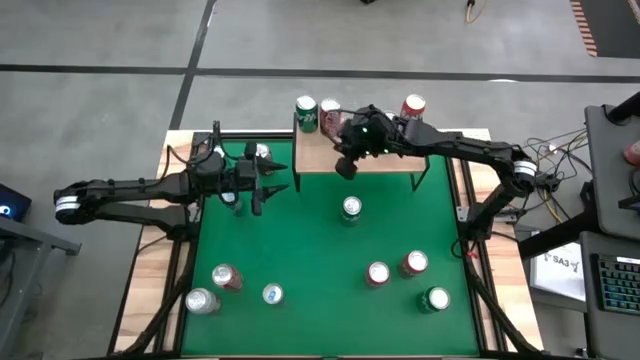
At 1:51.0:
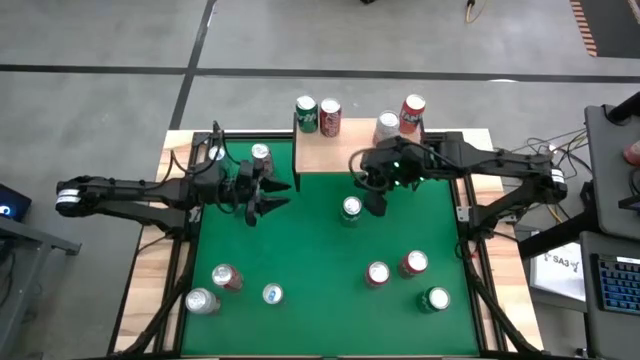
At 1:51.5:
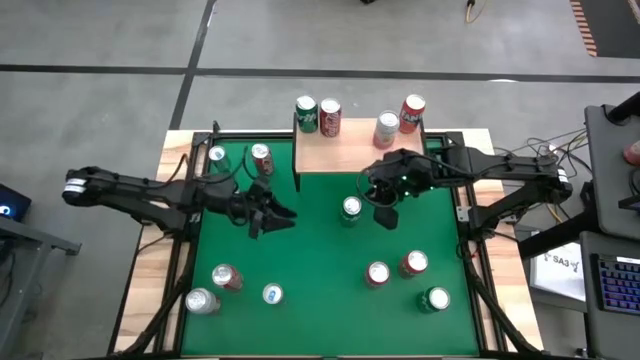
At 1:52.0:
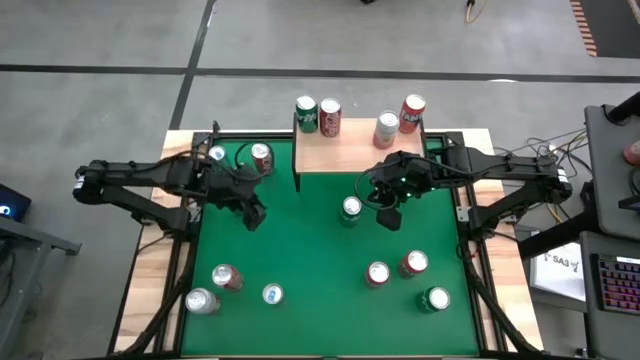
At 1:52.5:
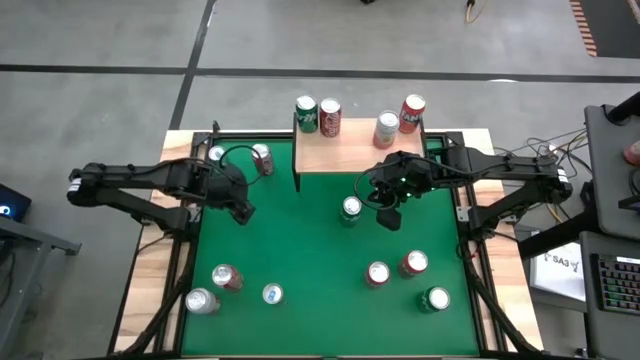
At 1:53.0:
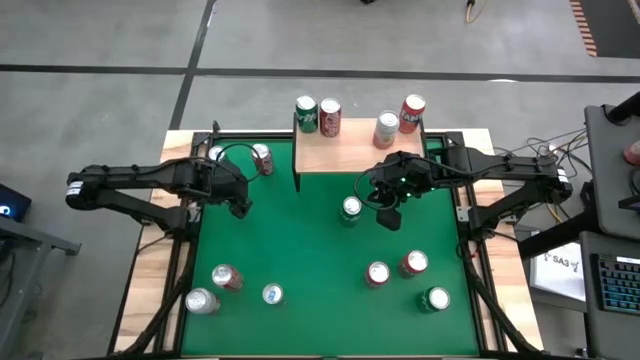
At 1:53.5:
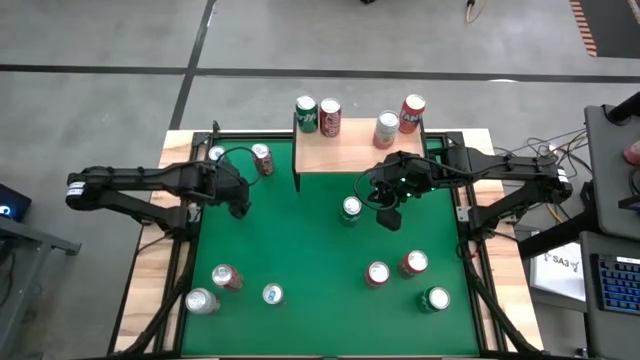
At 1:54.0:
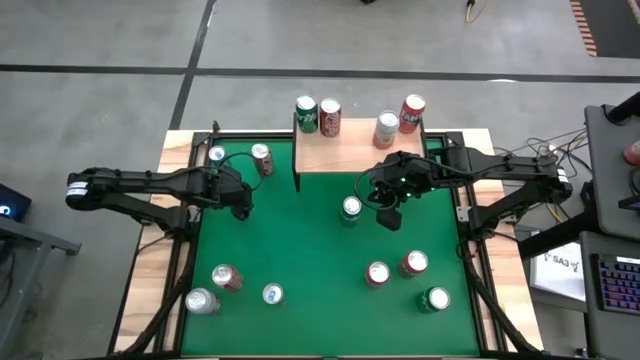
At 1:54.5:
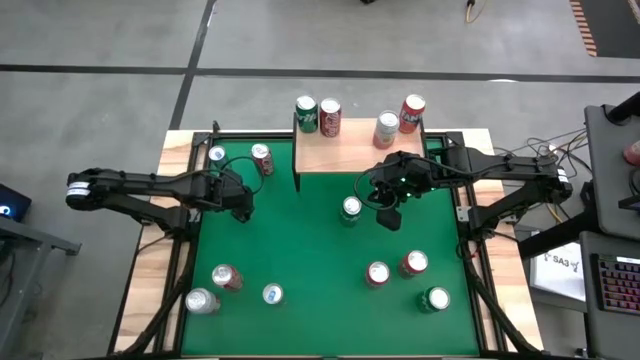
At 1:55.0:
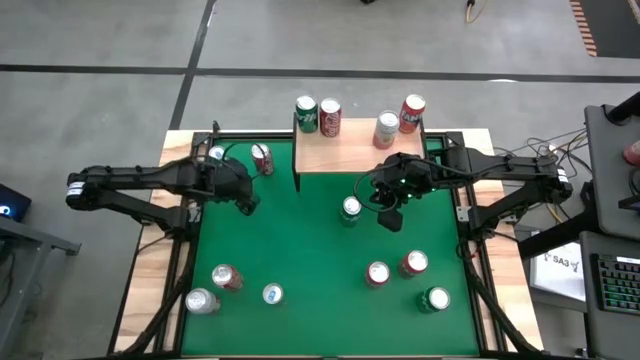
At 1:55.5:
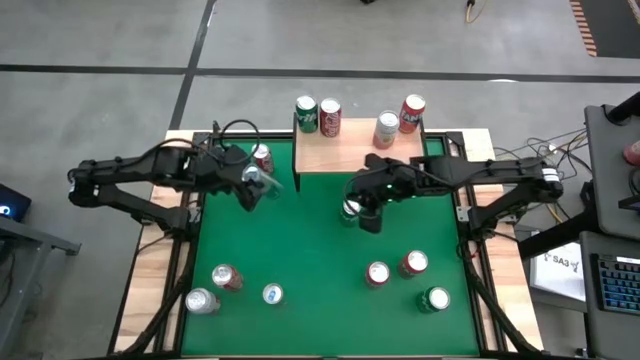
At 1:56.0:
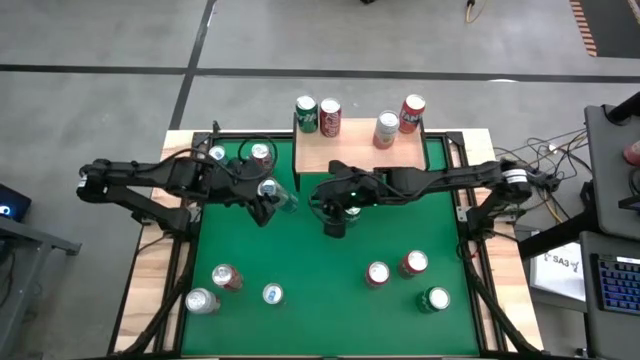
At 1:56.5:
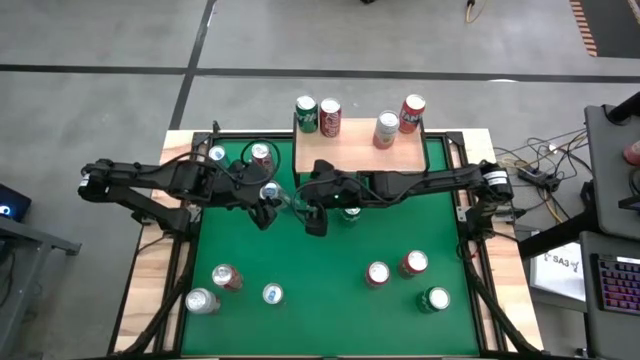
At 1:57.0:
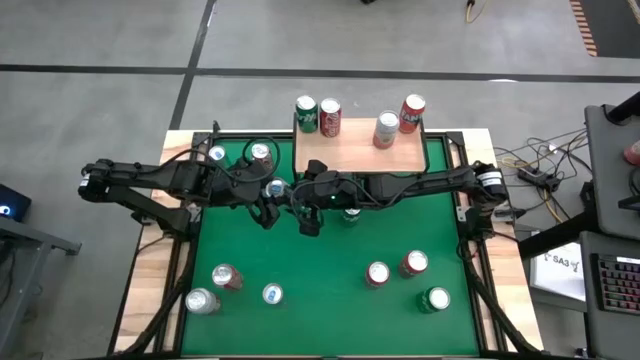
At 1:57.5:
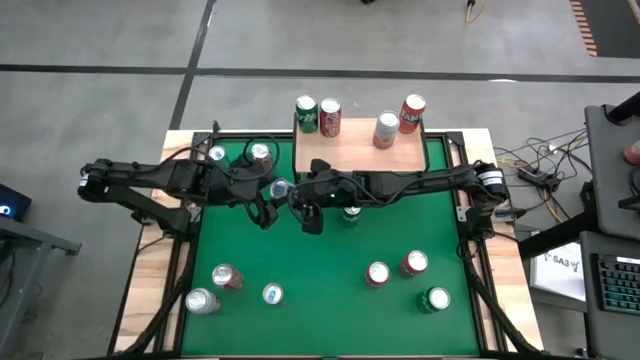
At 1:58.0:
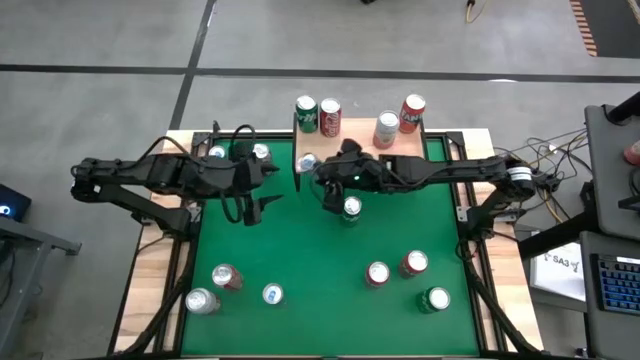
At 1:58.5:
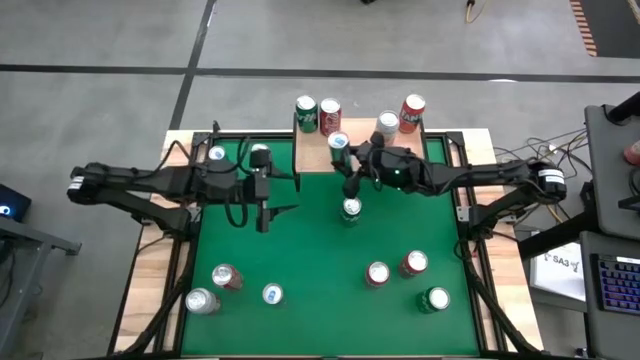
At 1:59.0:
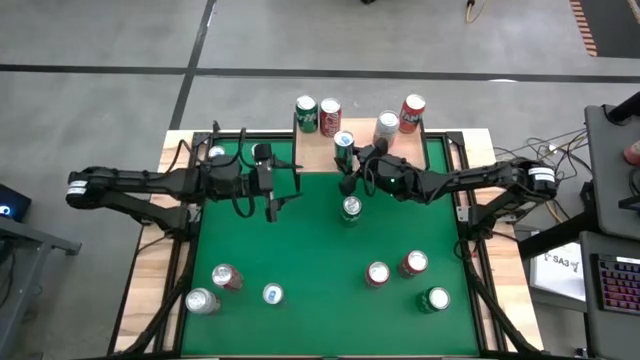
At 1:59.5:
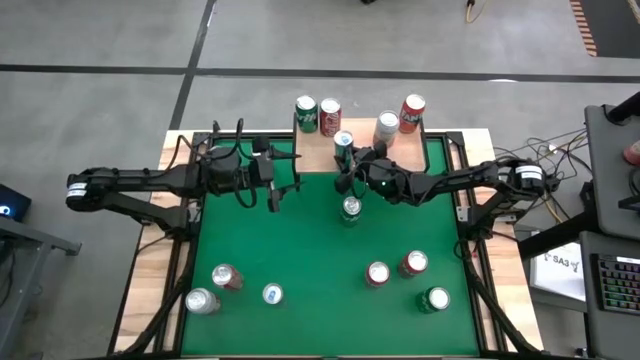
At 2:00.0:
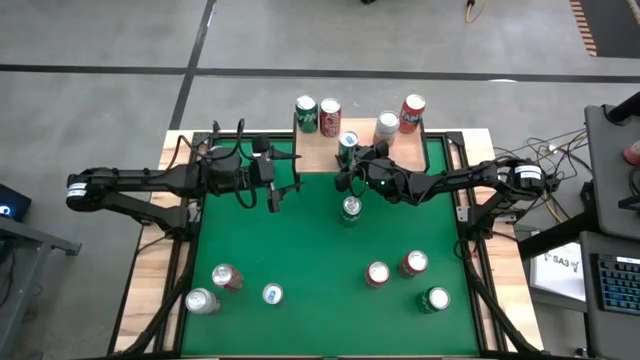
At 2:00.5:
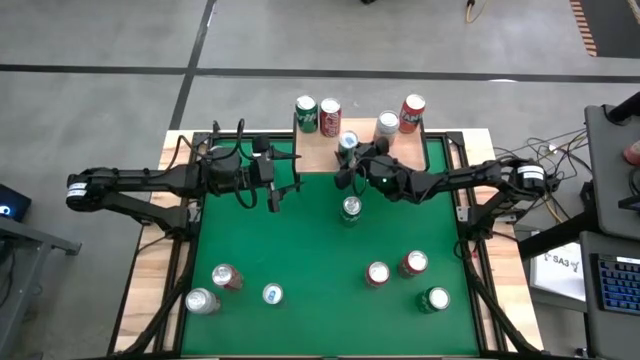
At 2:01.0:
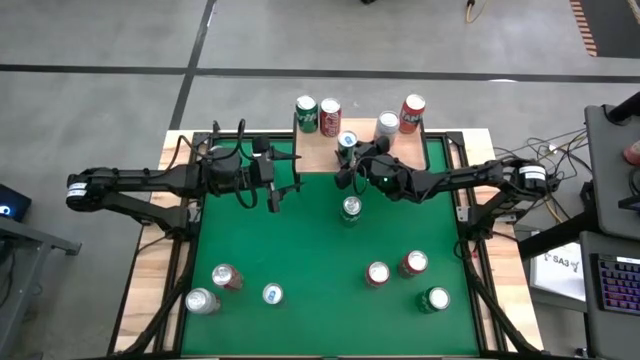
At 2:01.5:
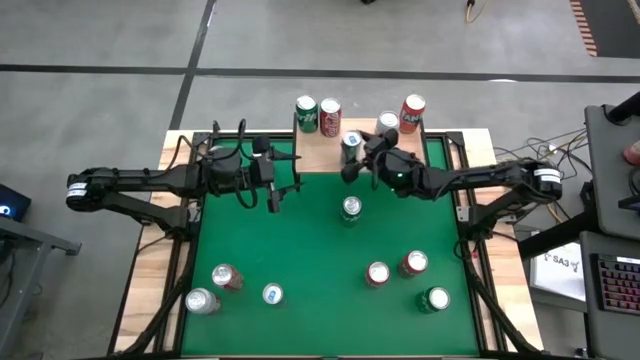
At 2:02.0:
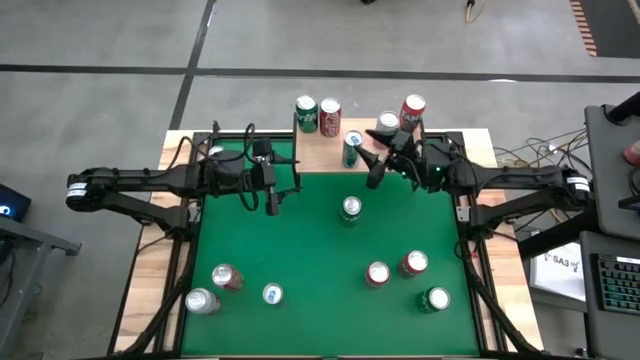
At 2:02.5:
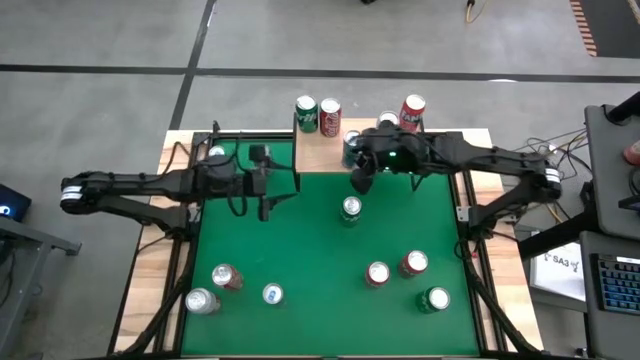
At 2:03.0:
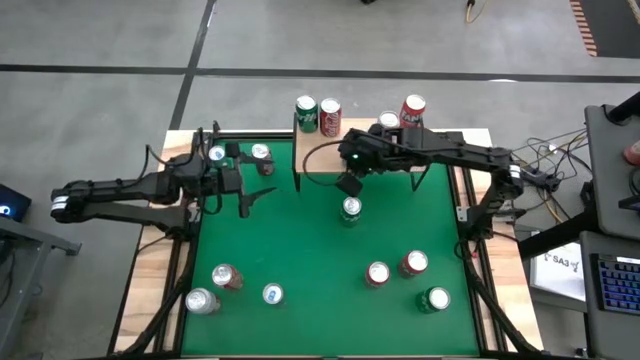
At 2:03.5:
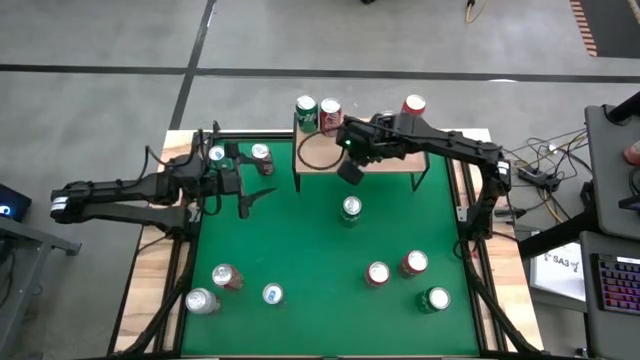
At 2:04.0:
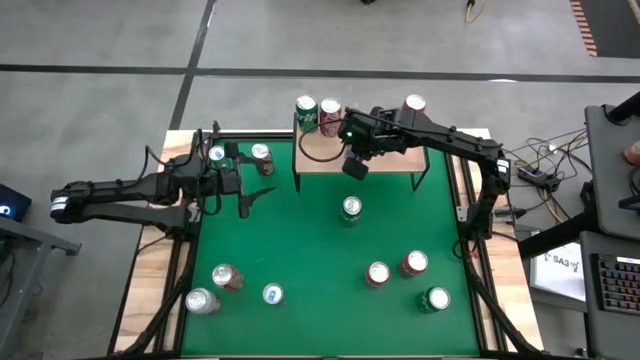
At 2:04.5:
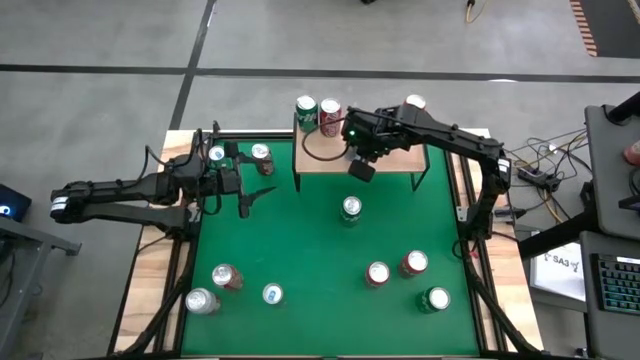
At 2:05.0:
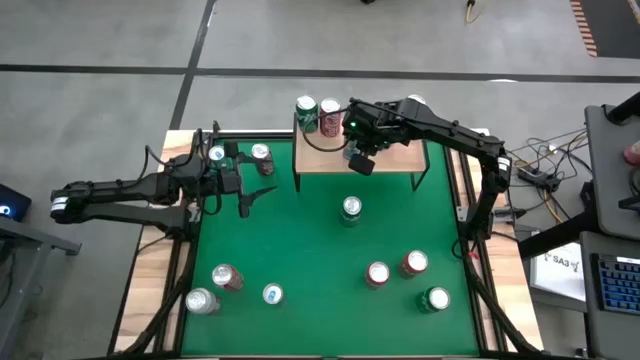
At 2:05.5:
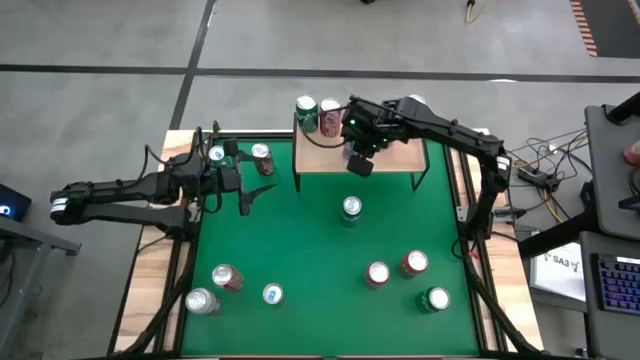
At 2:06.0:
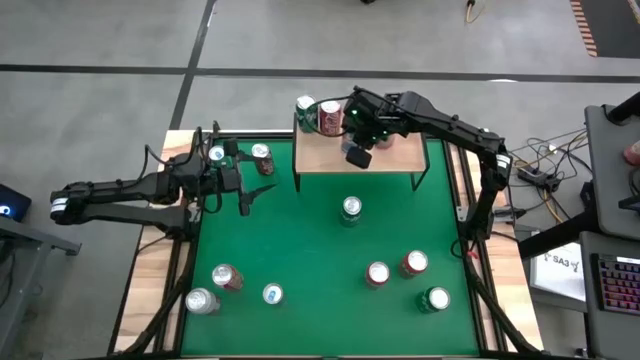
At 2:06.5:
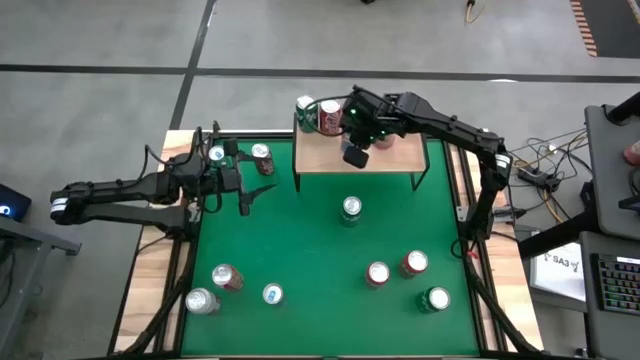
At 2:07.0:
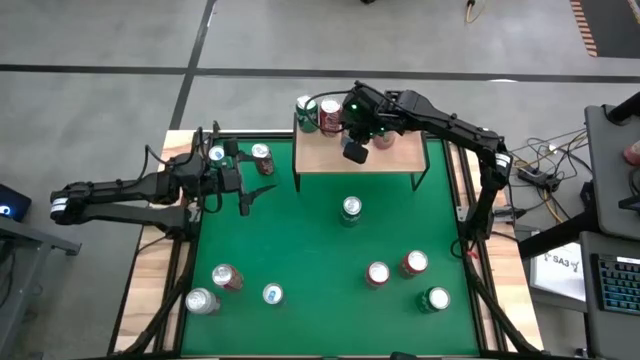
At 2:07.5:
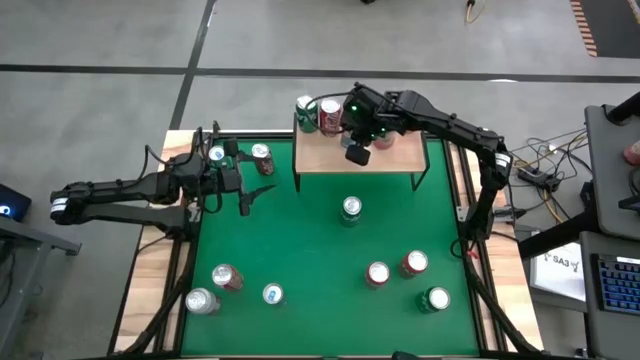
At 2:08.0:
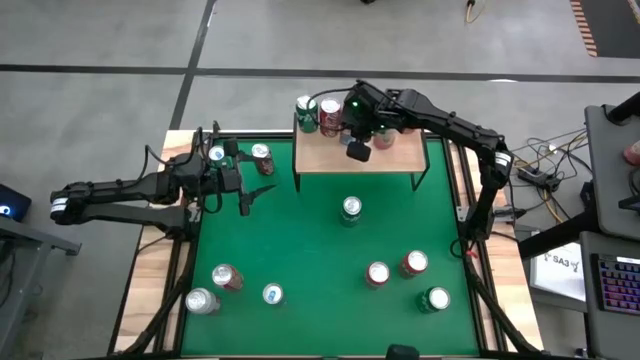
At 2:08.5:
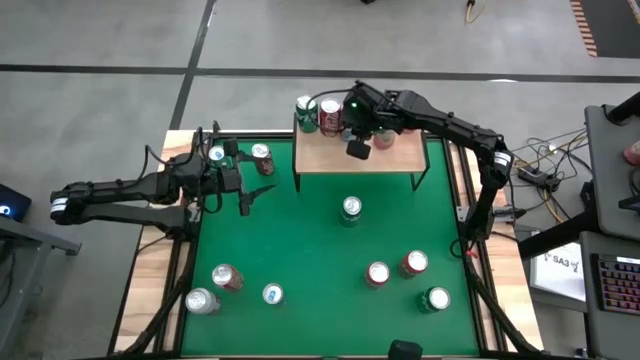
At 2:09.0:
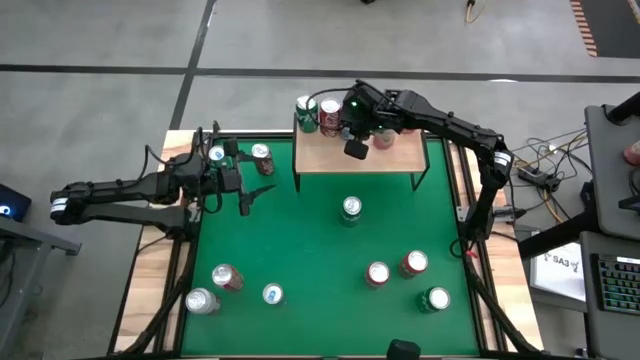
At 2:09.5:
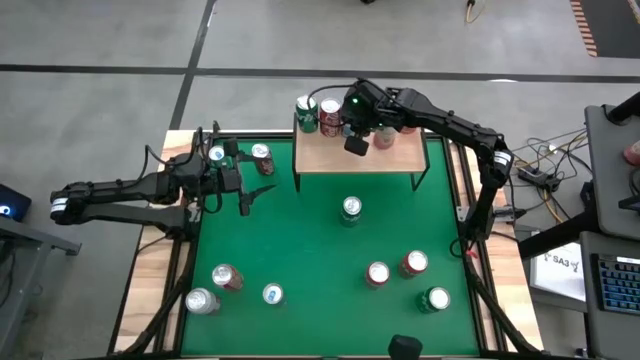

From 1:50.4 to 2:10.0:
Task: Place canned beverage on shelf
Put the middle blue soda can on the shelf

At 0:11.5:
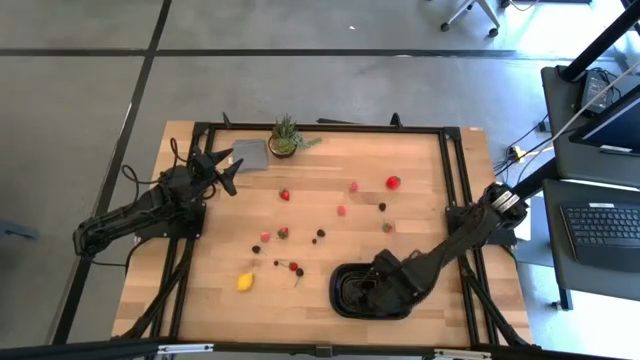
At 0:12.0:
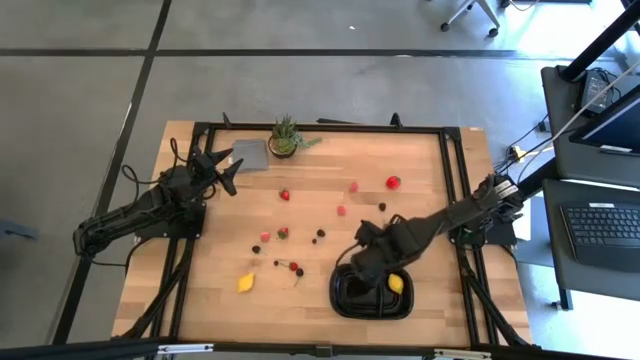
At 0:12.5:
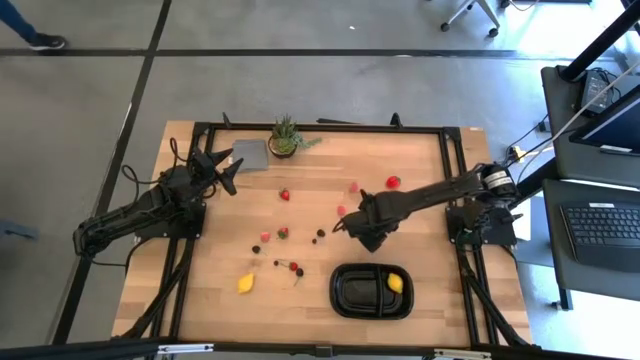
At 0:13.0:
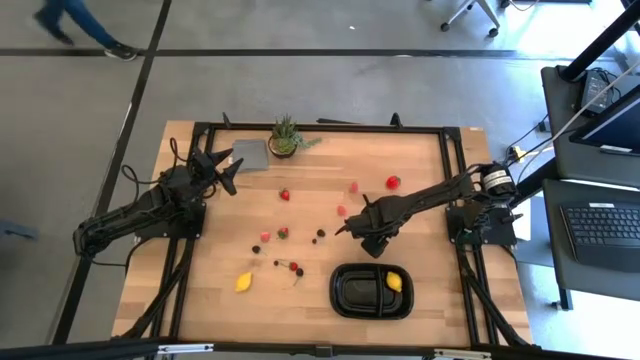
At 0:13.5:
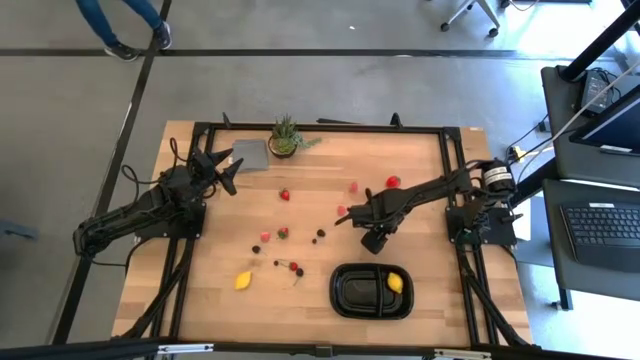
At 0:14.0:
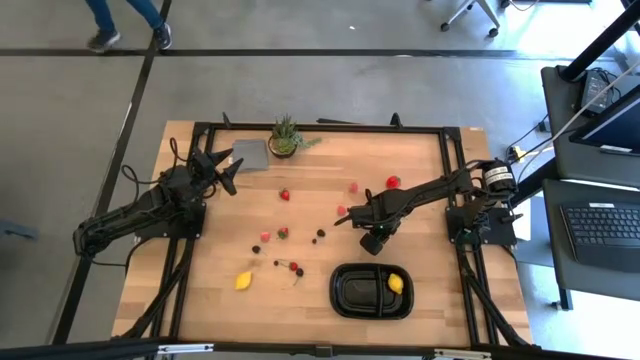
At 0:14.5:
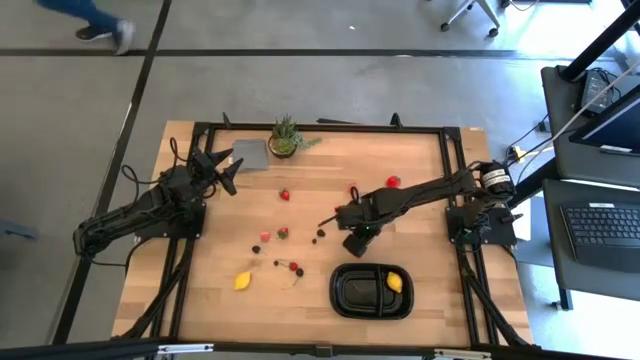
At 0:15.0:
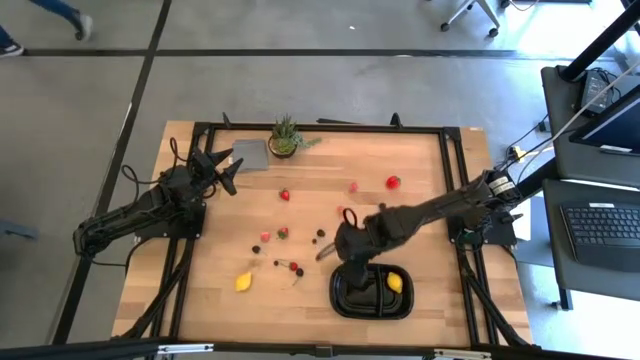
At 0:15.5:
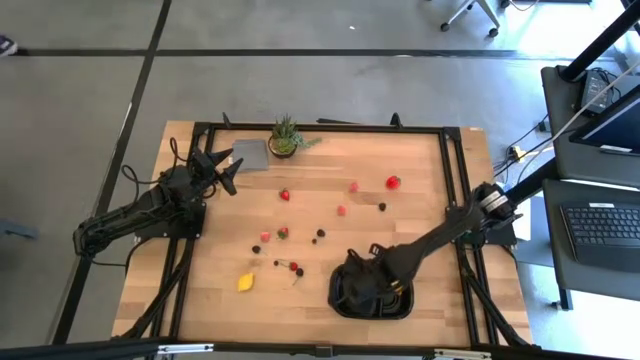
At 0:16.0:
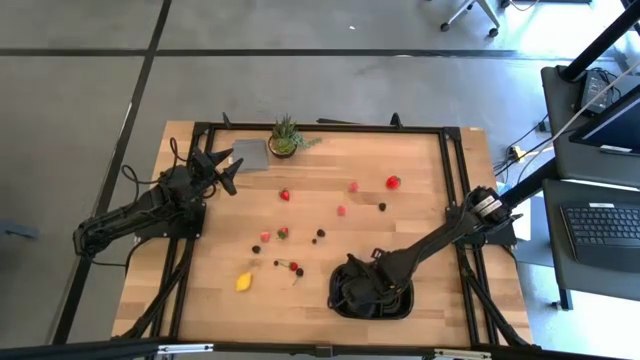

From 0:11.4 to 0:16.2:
Task: Pick and placing Produce into tupperware
Put the red strawberry into the black bin
